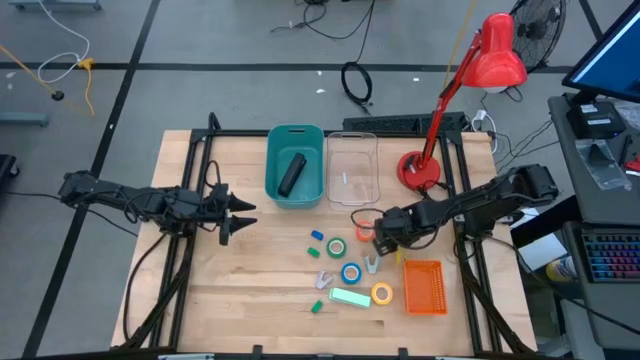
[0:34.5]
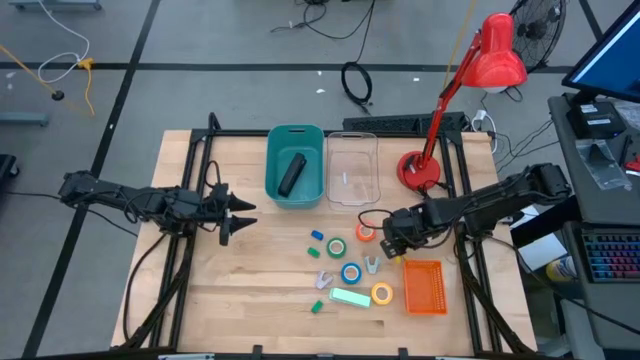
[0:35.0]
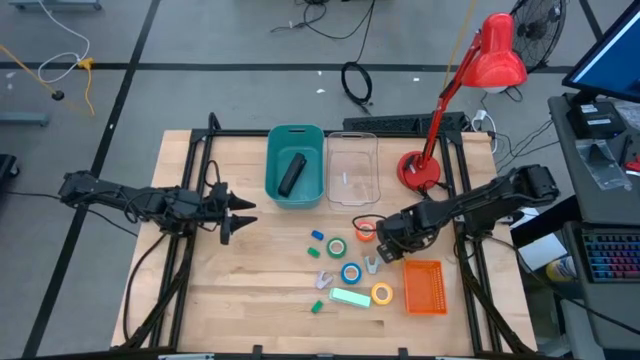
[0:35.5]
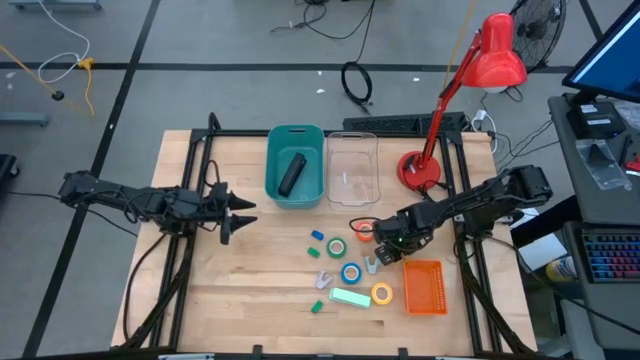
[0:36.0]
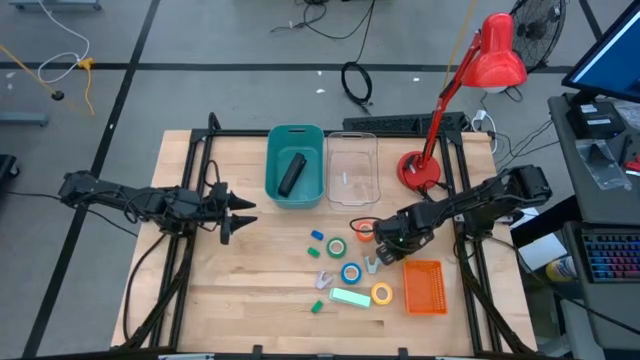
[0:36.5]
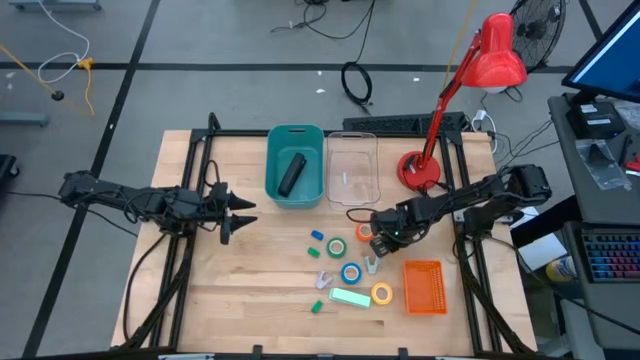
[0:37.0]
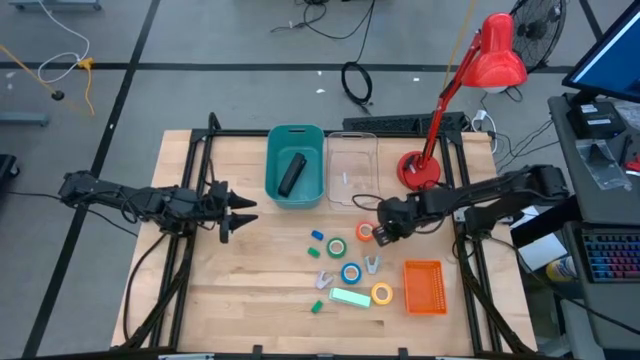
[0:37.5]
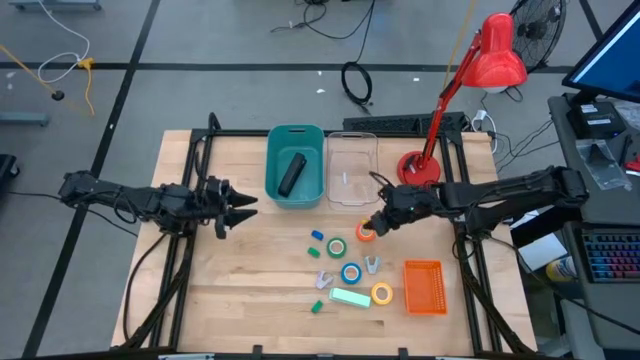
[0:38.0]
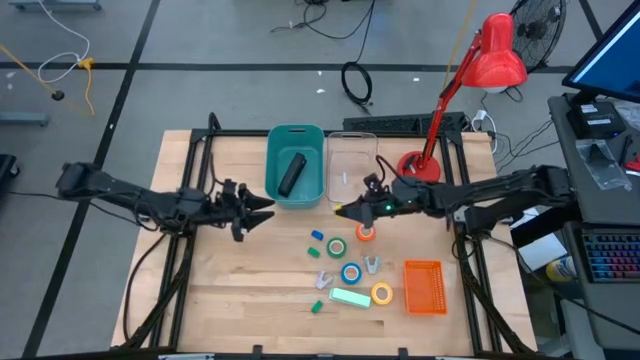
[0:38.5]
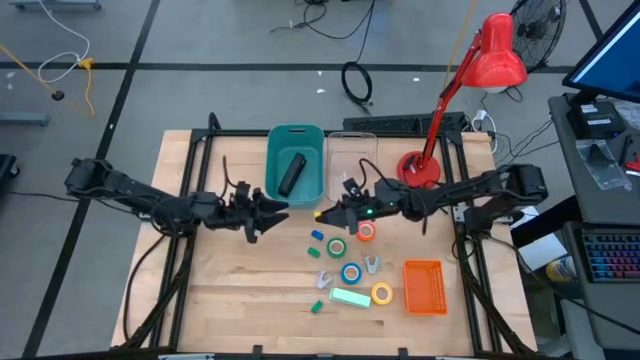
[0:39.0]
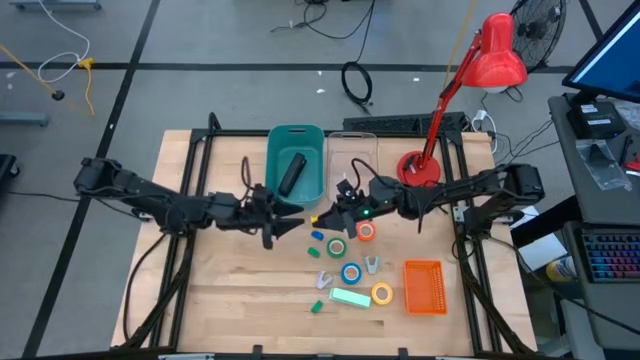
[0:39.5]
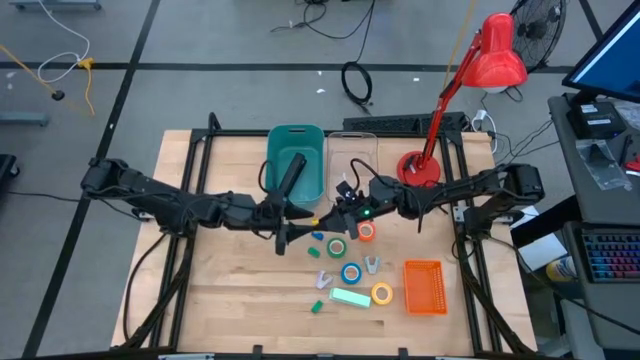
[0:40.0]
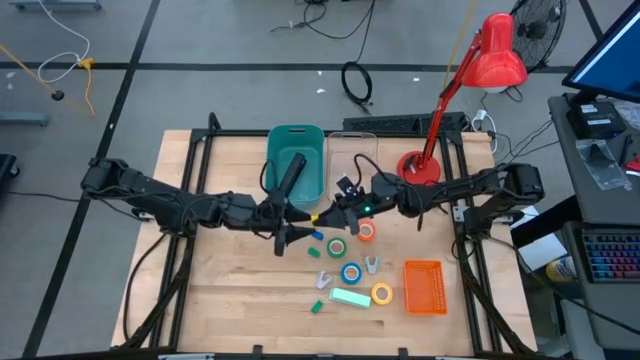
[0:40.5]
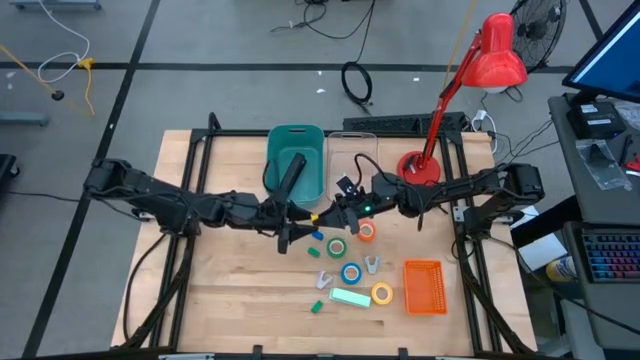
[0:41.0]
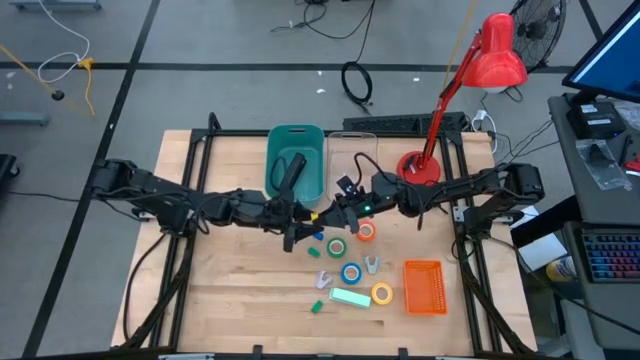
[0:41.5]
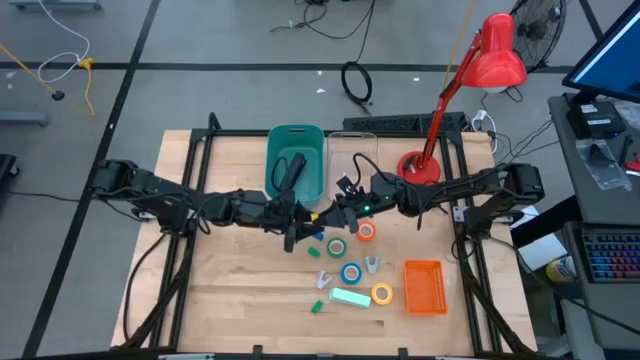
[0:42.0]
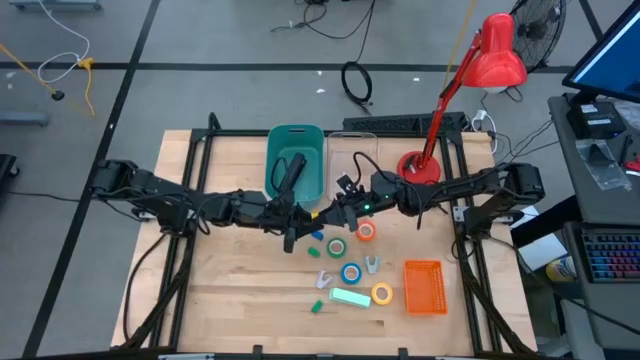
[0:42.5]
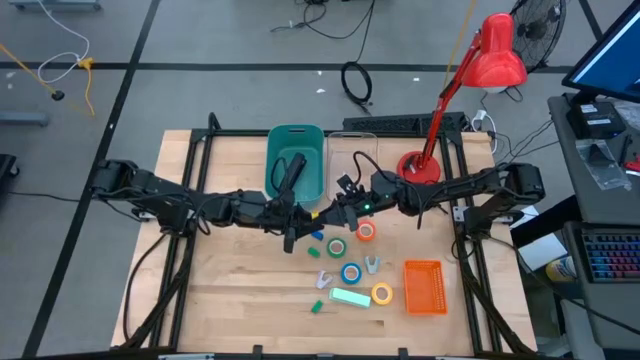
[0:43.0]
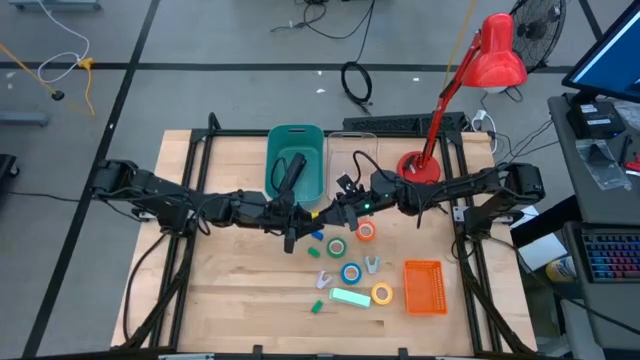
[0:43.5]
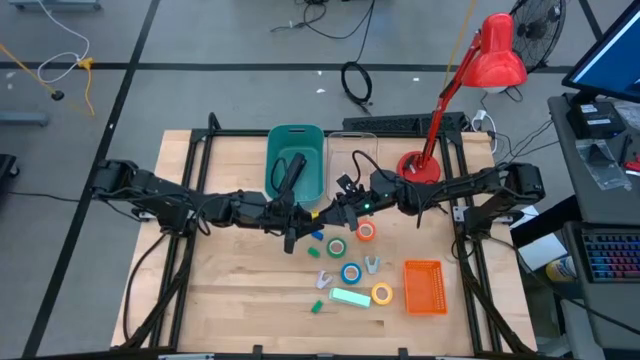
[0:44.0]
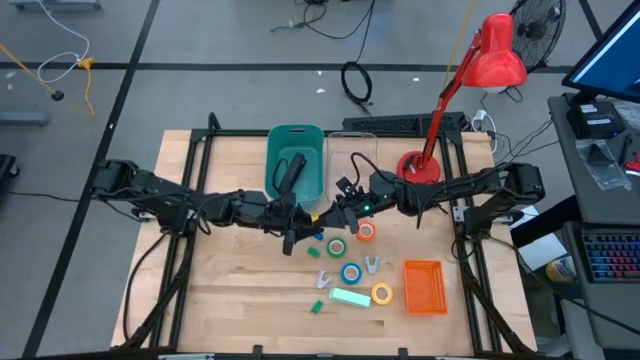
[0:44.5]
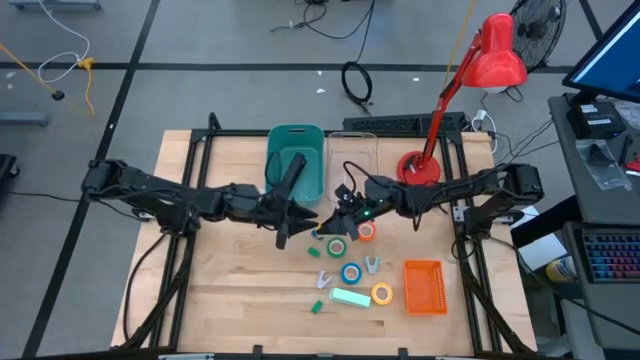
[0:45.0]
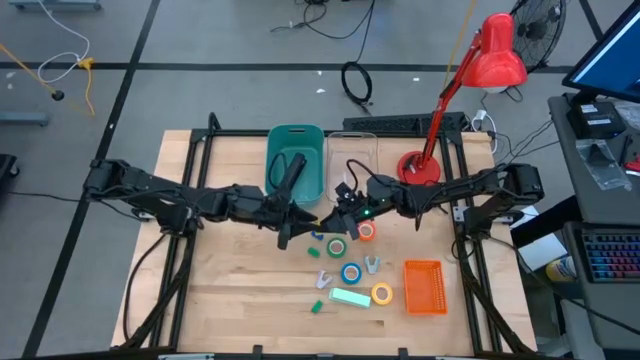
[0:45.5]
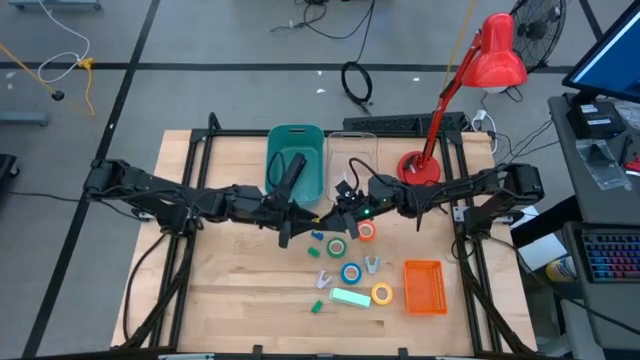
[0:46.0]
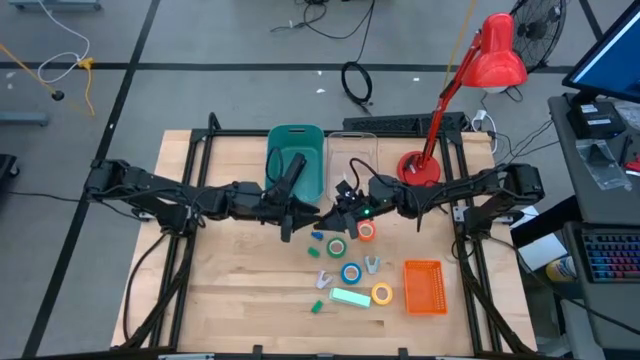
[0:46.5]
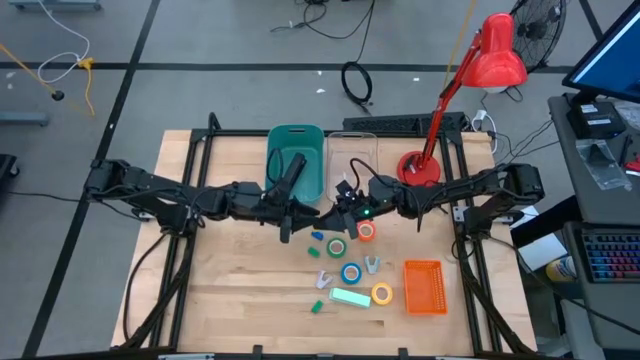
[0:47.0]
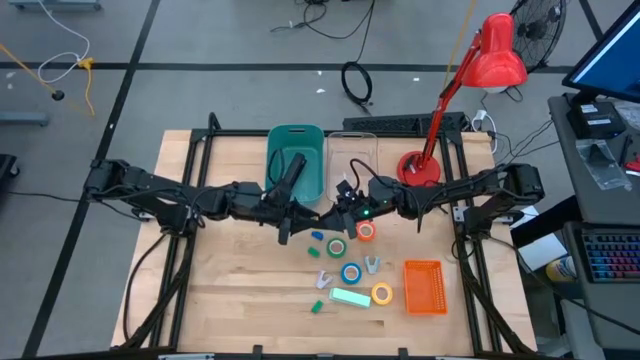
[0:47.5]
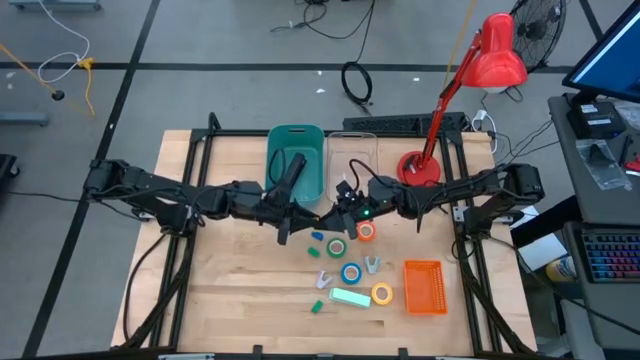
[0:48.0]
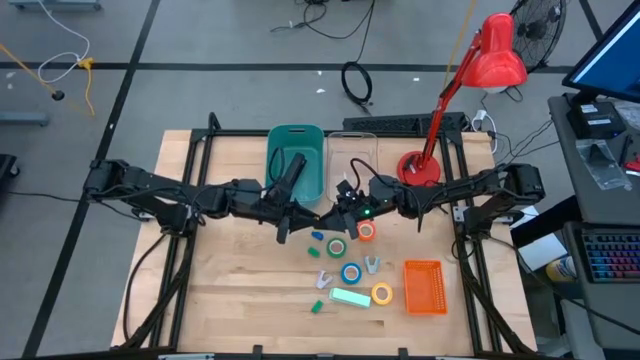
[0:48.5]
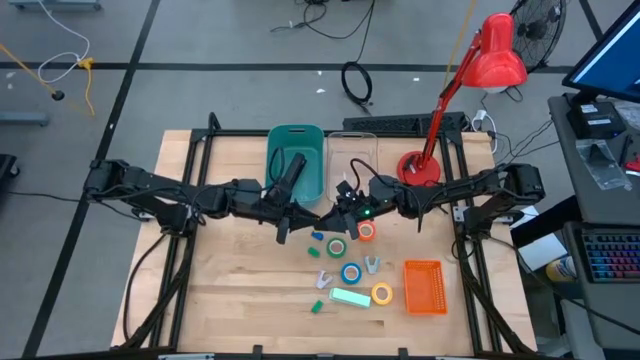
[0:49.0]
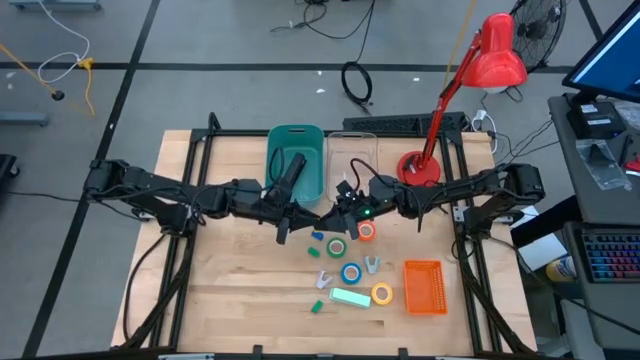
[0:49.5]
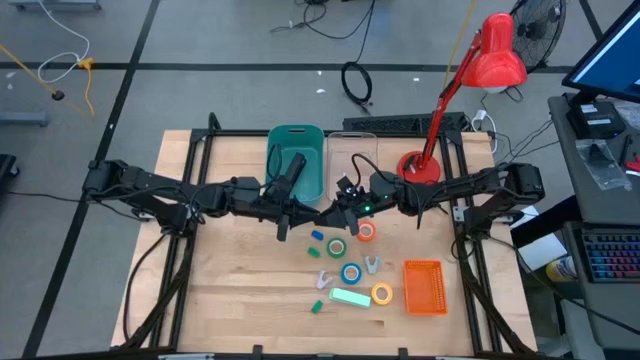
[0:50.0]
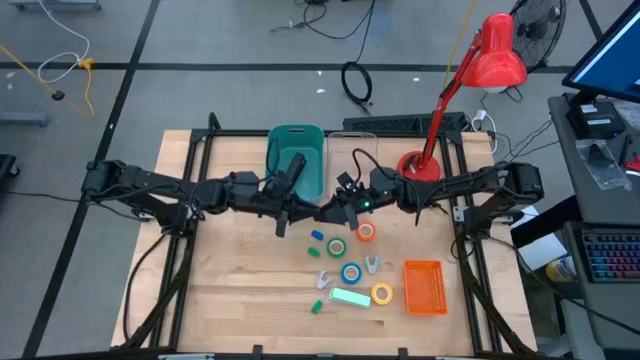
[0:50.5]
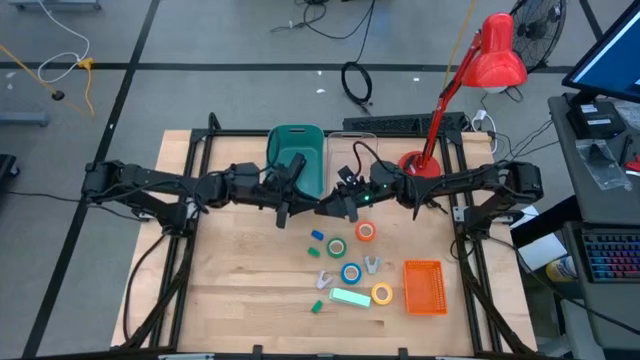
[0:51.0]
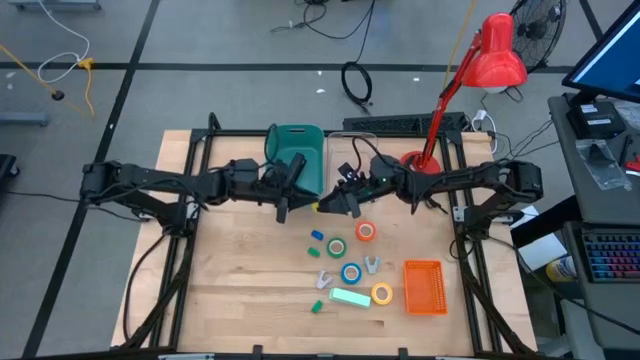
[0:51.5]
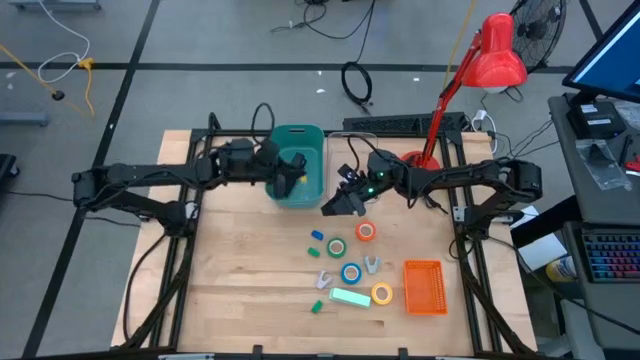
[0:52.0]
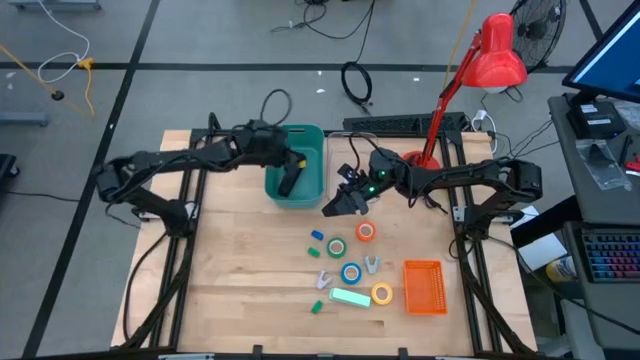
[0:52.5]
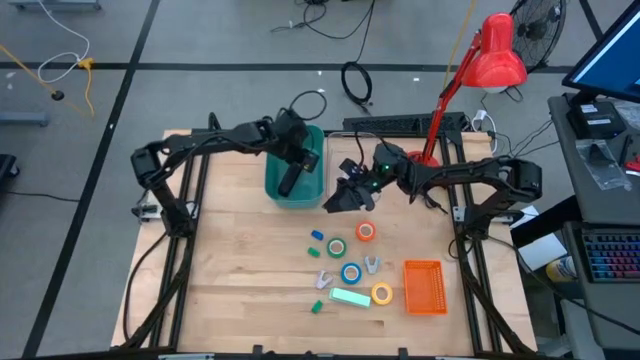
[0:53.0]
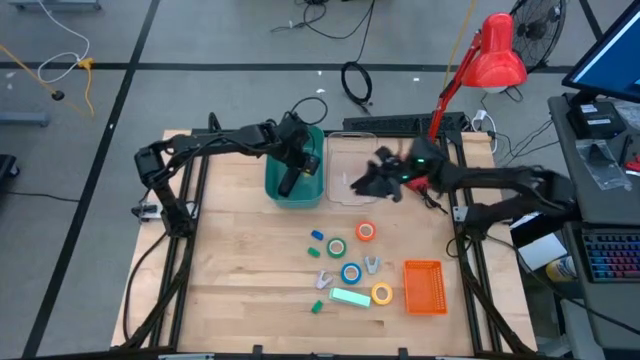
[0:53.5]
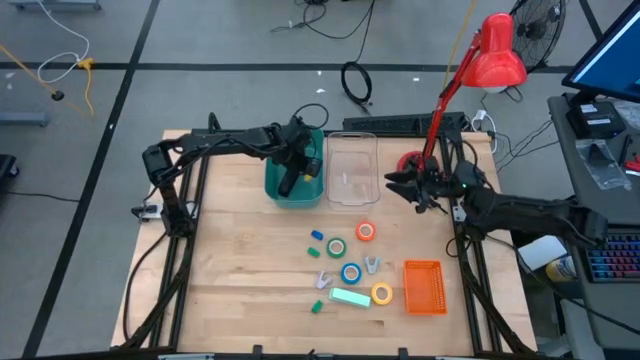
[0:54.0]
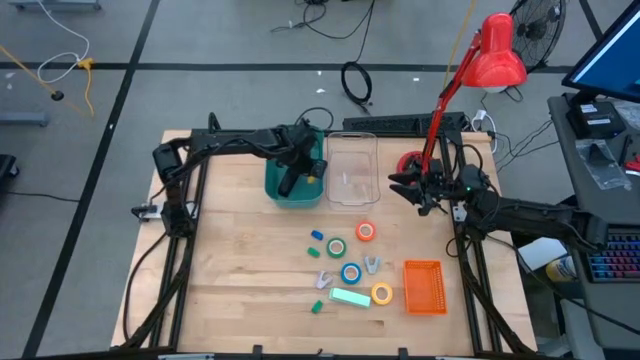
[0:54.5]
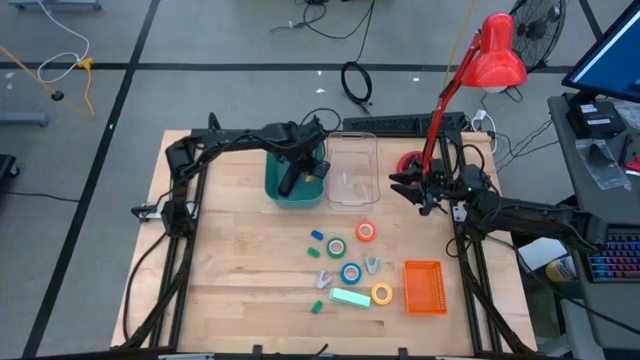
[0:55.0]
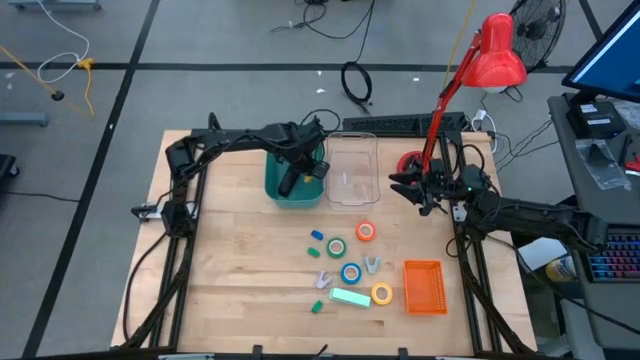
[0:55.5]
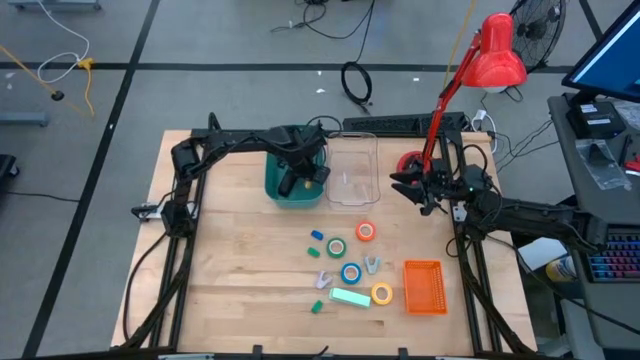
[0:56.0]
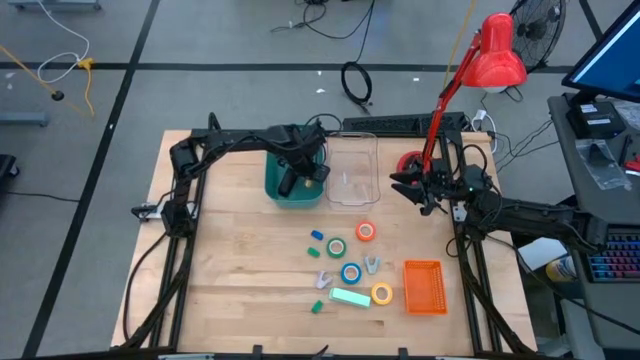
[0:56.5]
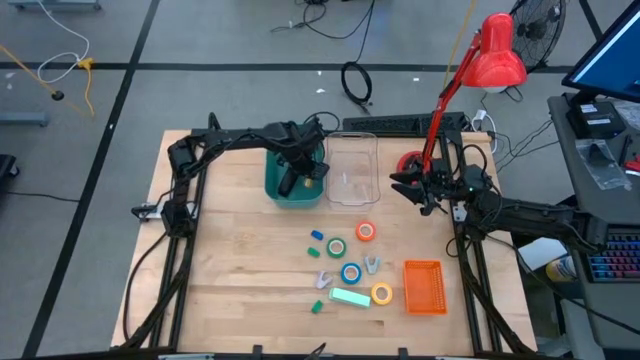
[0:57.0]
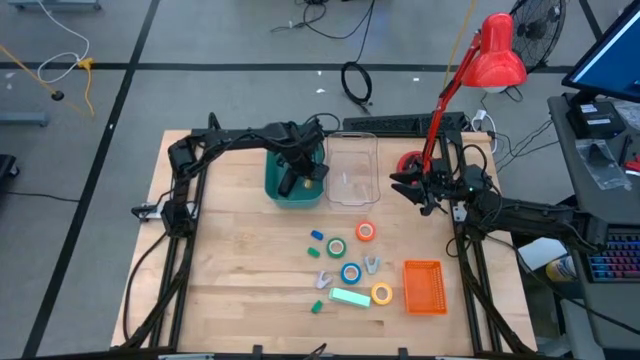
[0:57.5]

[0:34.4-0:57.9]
Task: Pick and place Stapler, Stapler remover, tape
Put the small yellow stapler into the green bin
